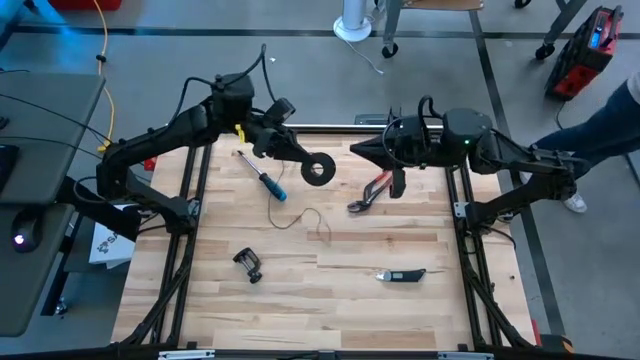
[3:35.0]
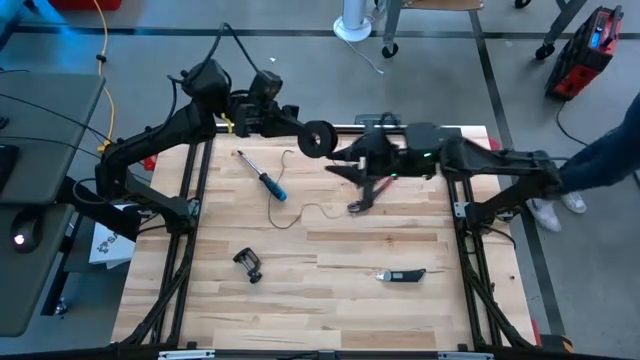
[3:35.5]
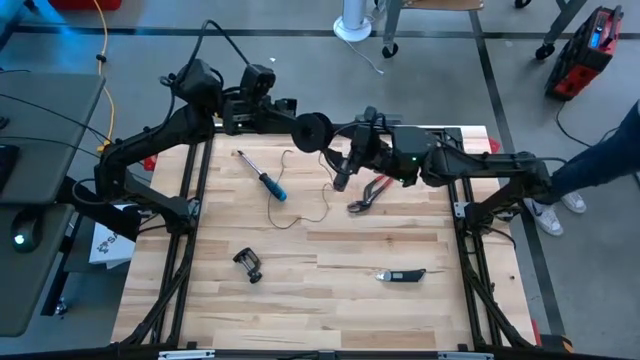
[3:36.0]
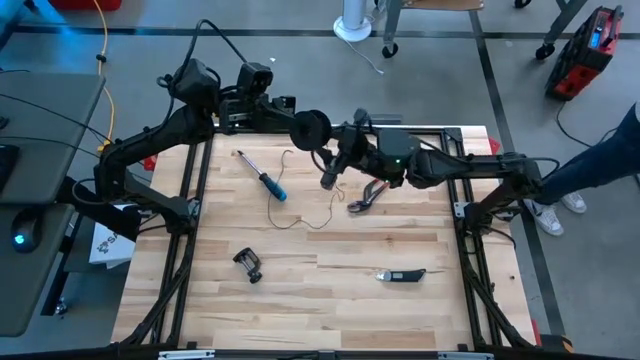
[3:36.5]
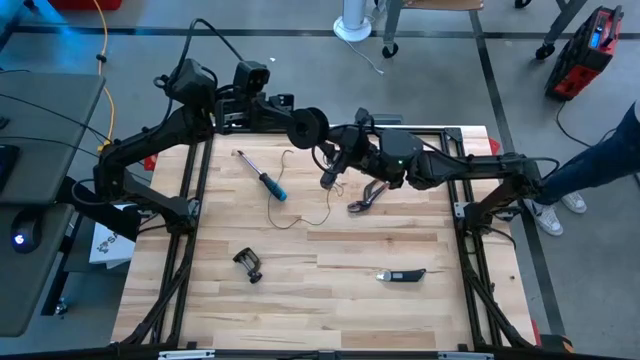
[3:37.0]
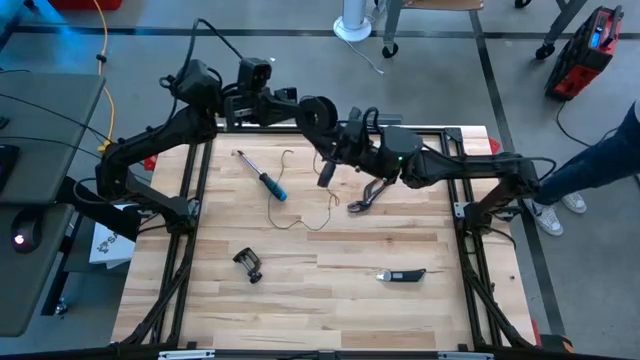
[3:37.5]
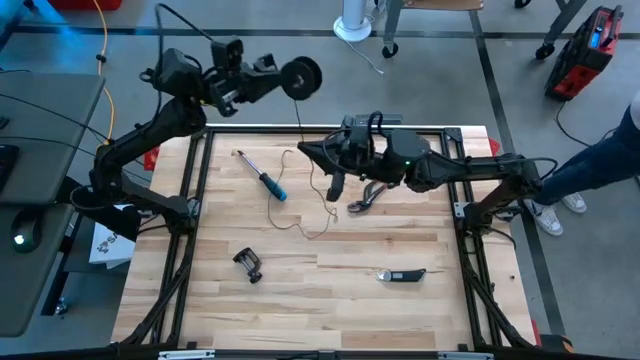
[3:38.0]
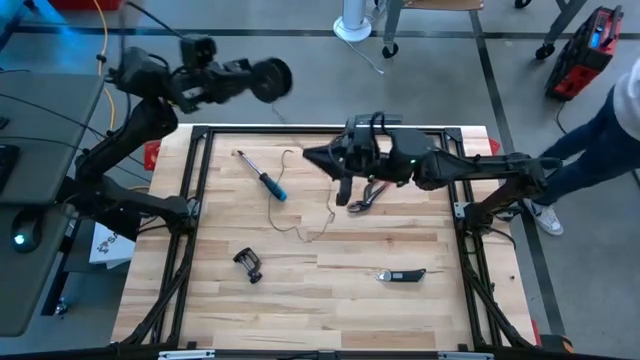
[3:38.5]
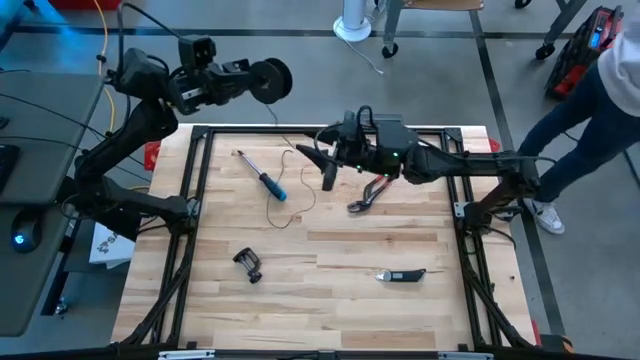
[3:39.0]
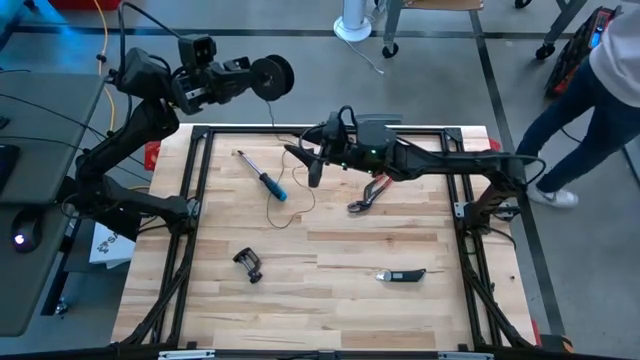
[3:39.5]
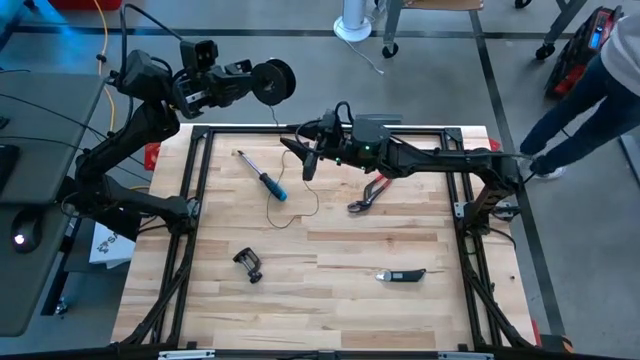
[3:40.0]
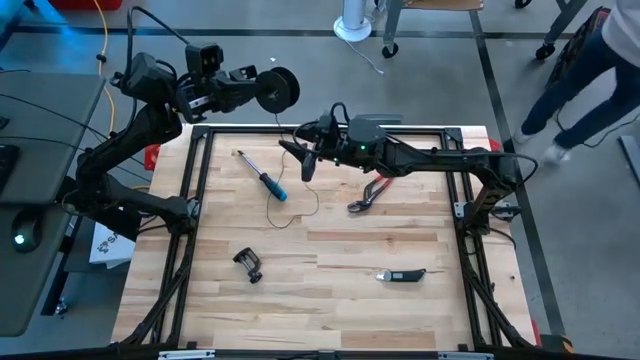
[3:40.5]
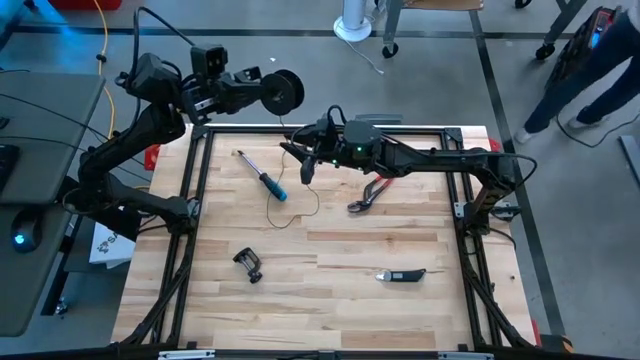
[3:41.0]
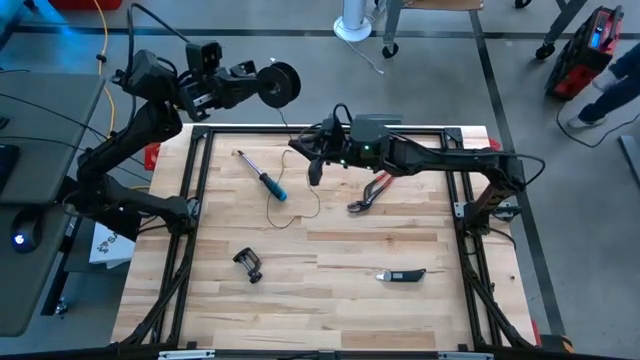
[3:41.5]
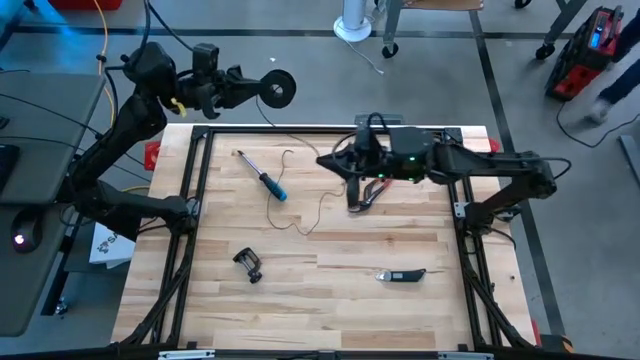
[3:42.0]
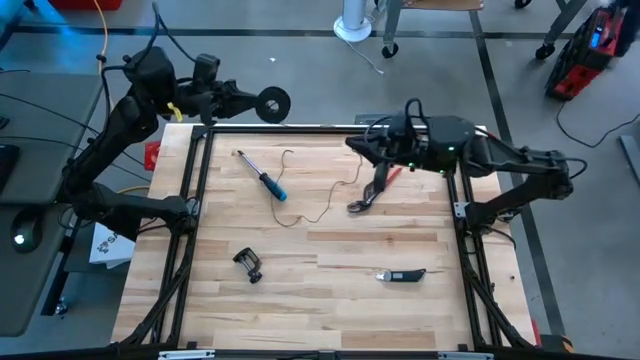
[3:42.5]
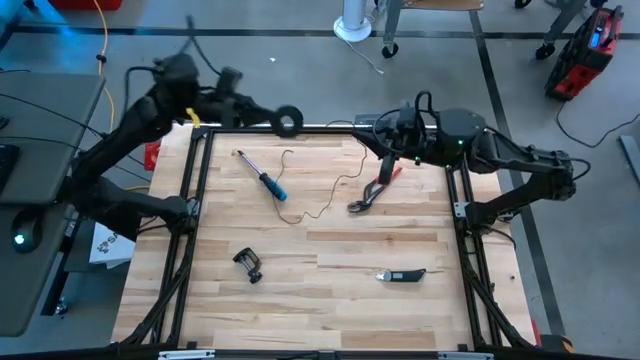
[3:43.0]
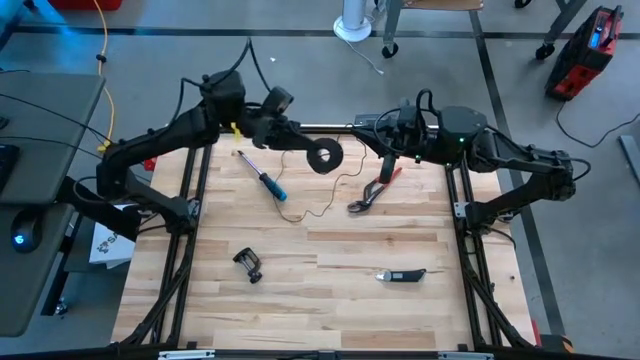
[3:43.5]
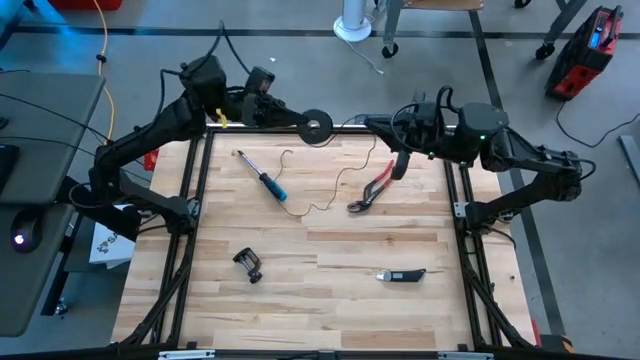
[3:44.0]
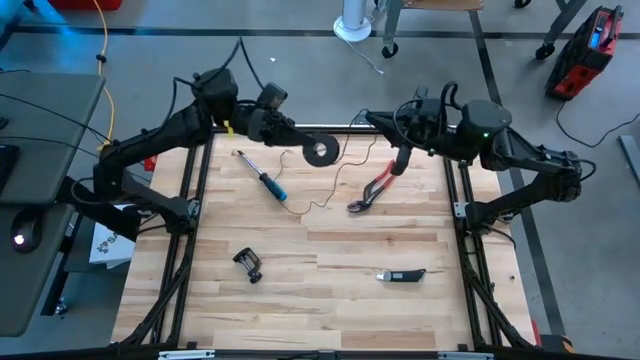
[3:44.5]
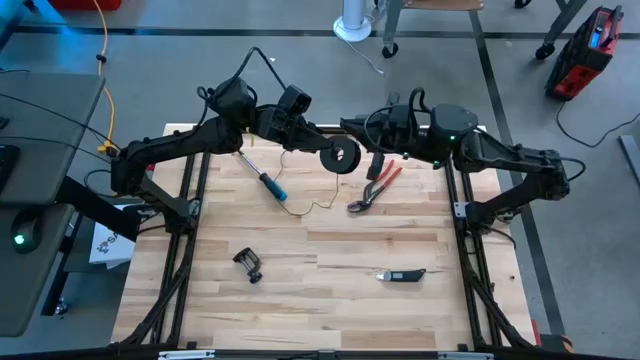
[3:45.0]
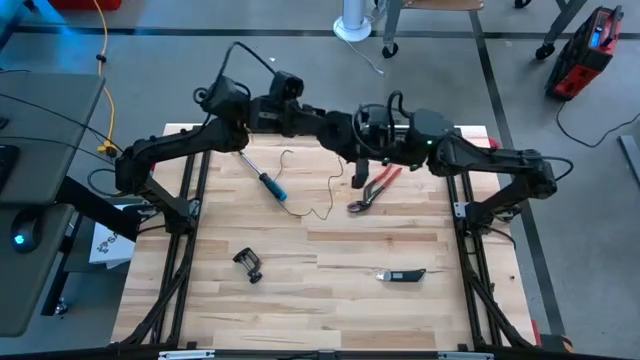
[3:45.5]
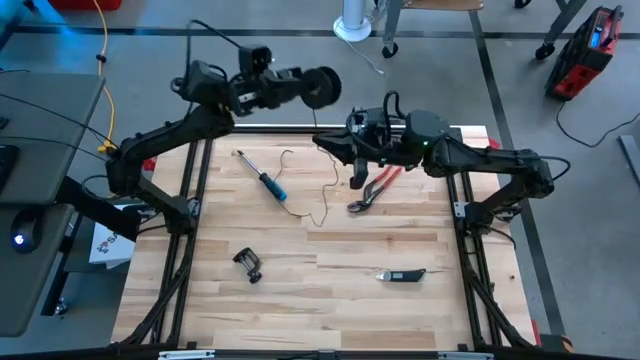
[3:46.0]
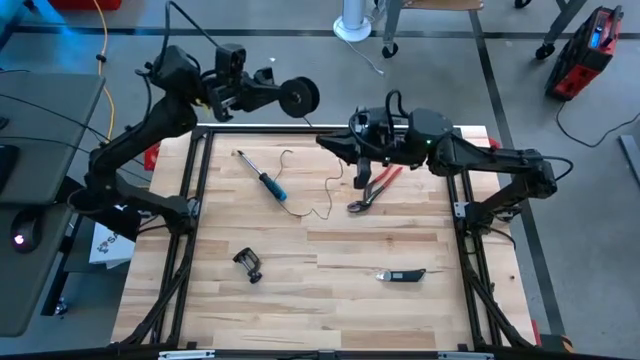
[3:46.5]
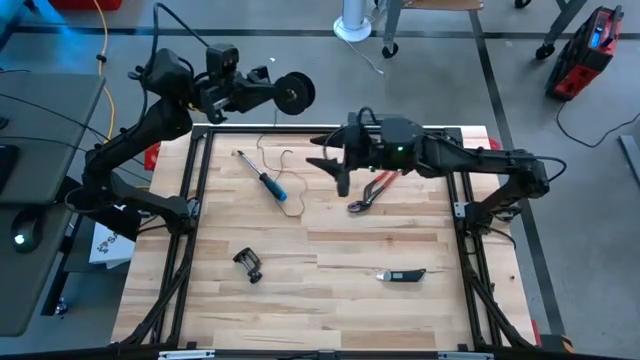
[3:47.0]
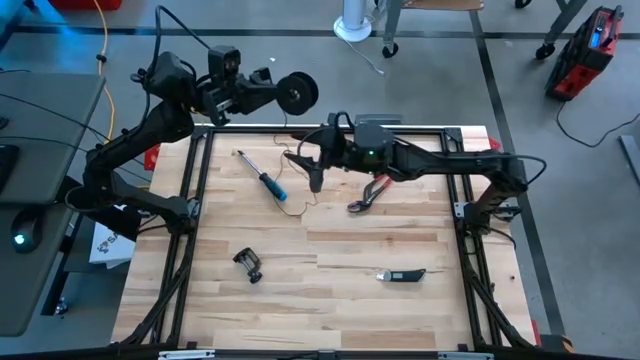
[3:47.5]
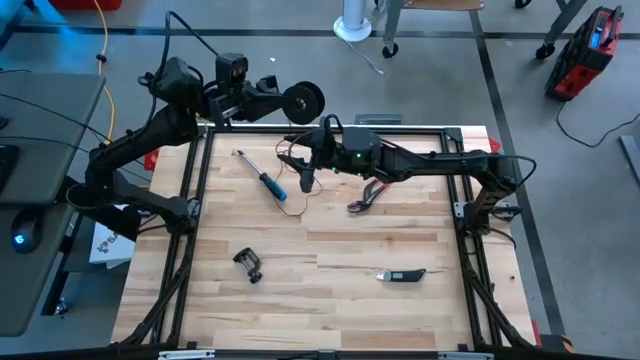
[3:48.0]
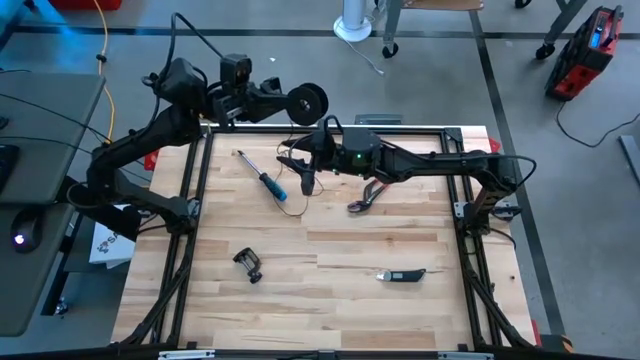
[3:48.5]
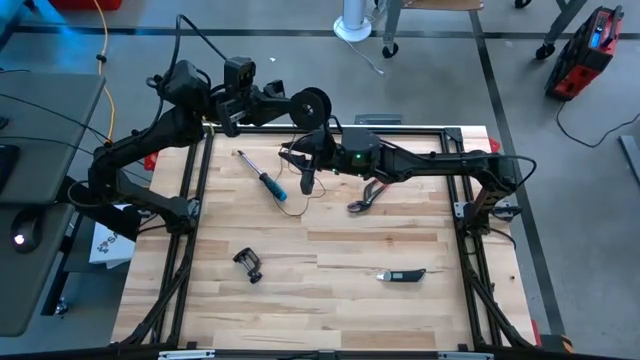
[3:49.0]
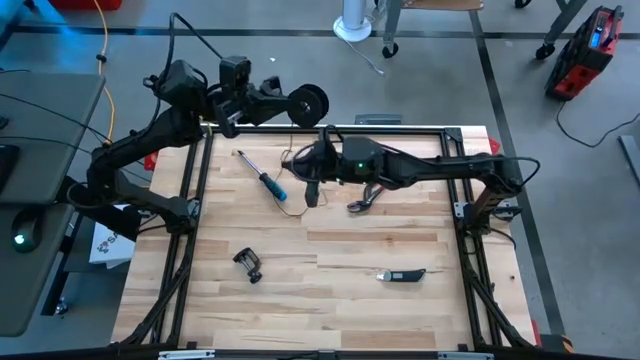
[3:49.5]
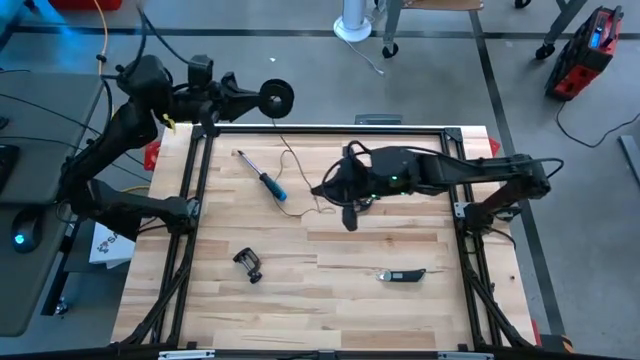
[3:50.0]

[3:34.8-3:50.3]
Task: Coil cords
Coil the black wire onto the black spool

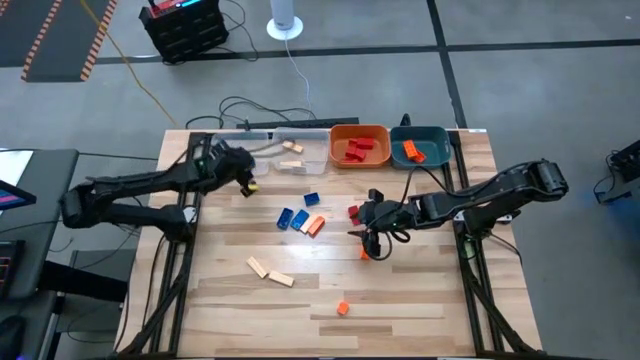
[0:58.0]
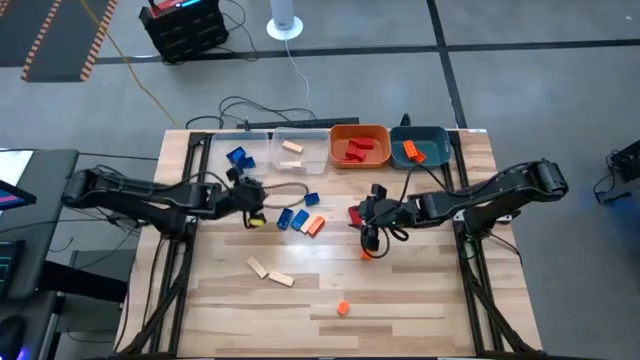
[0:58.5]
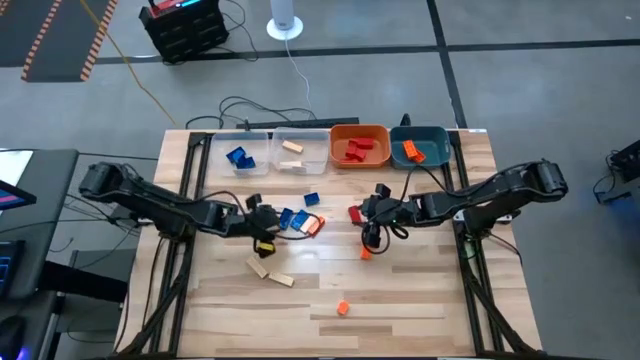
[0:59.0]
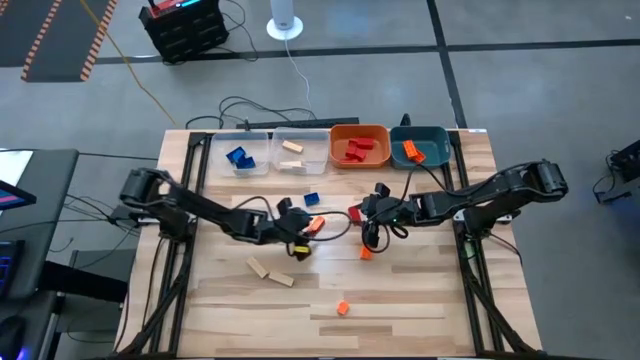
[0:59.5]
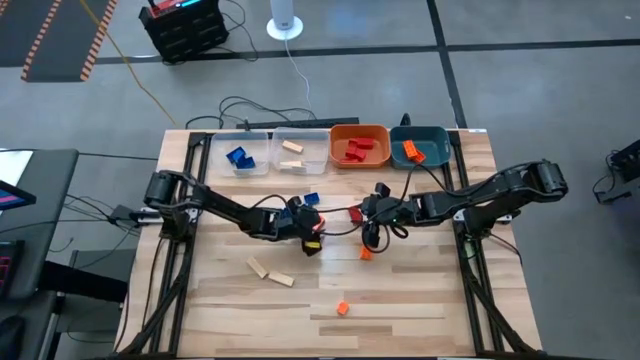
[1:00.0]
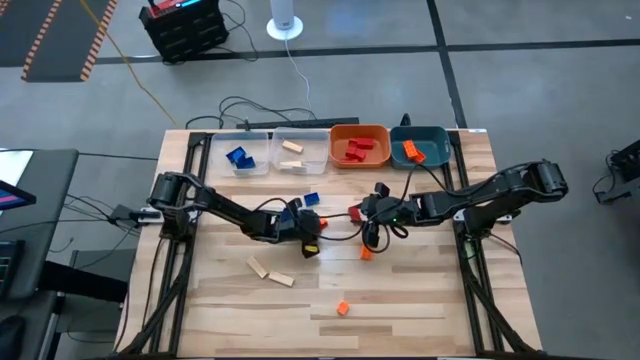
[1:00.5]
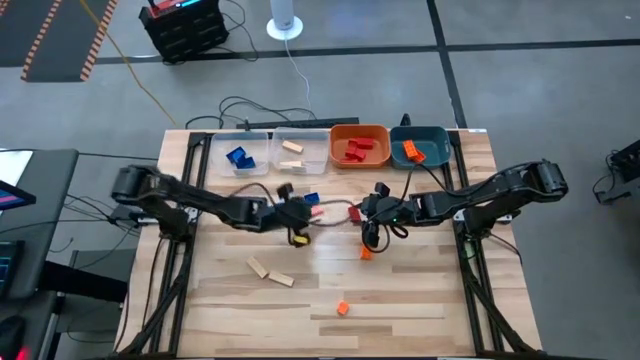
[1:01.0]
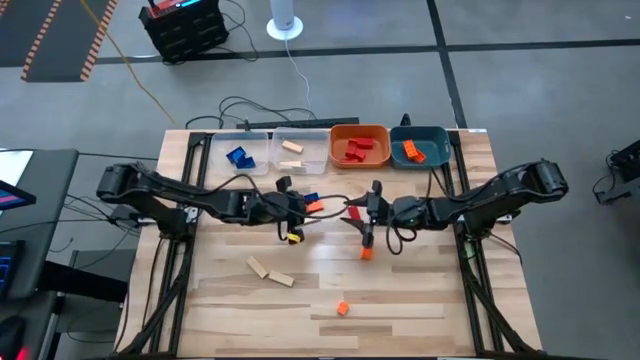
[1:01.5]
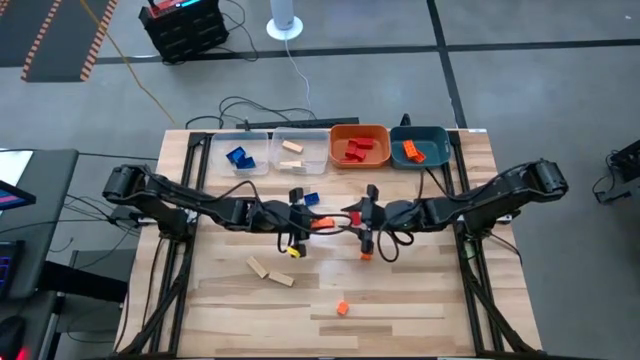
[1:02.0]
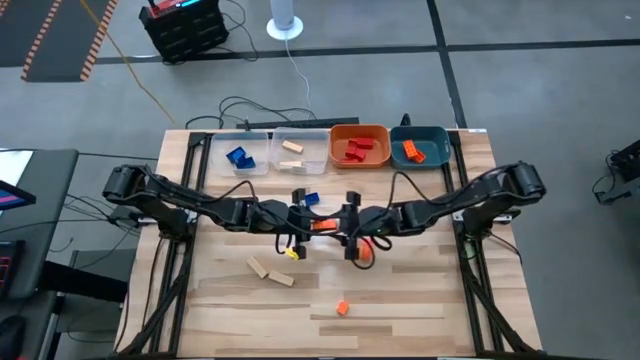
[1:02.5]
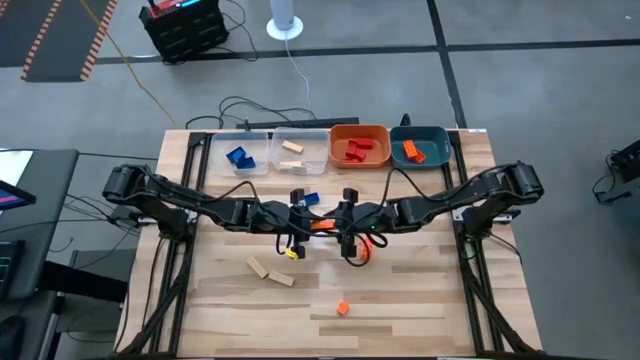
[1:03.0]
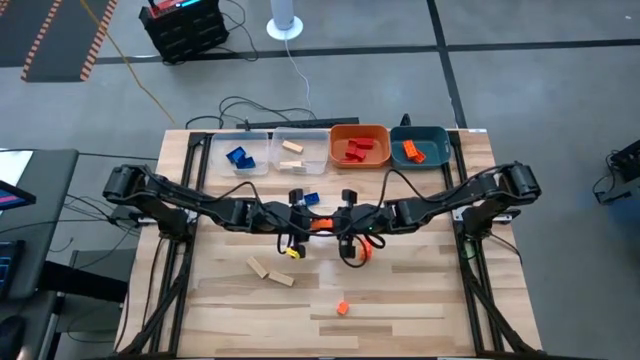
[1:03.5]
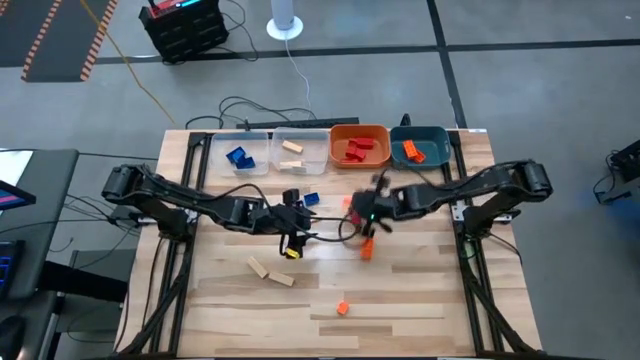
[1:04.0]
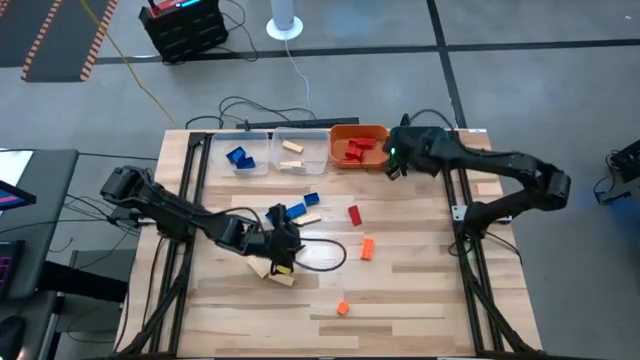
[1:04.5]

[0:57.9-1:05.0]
Task: Sort blocks
Put the orange game piece into the blue bin
